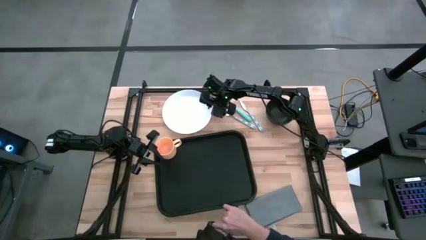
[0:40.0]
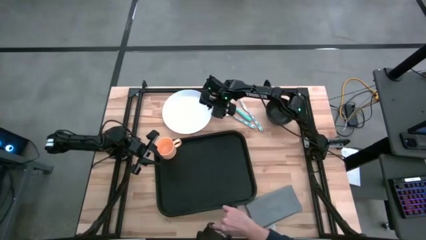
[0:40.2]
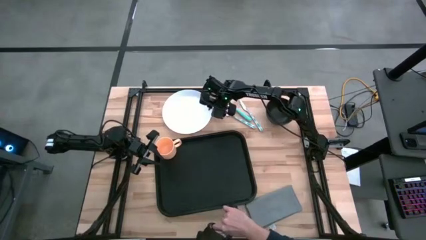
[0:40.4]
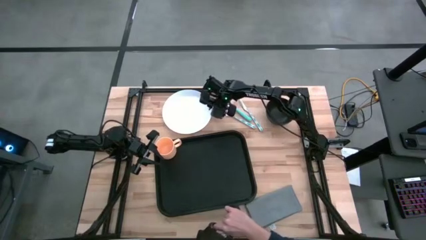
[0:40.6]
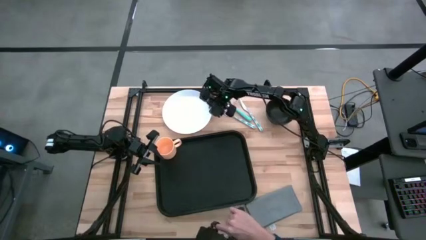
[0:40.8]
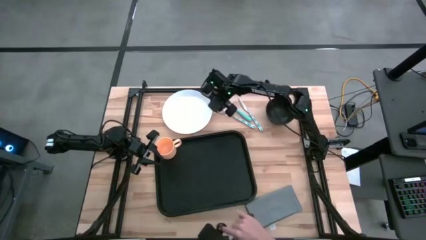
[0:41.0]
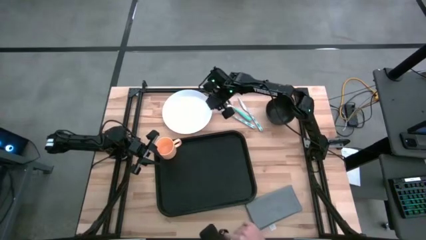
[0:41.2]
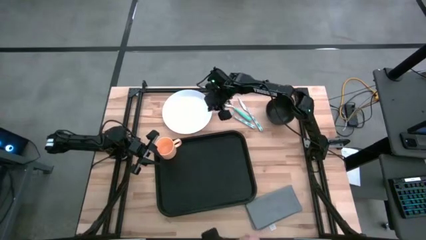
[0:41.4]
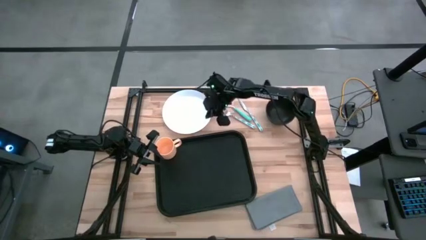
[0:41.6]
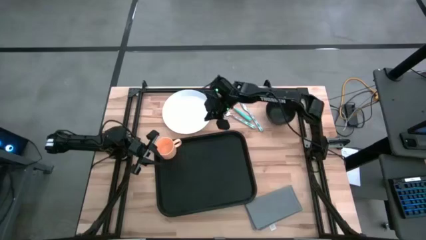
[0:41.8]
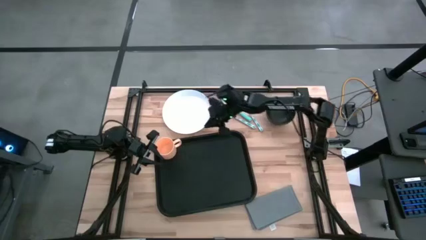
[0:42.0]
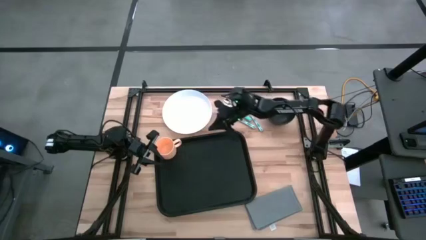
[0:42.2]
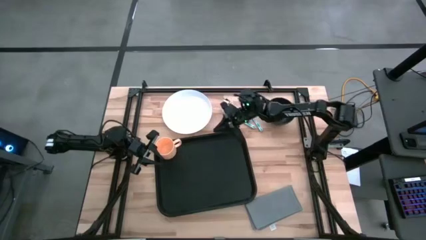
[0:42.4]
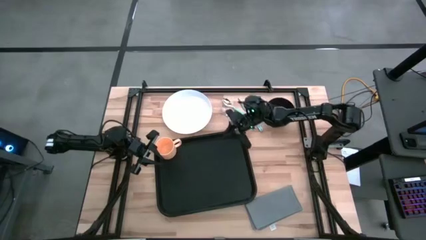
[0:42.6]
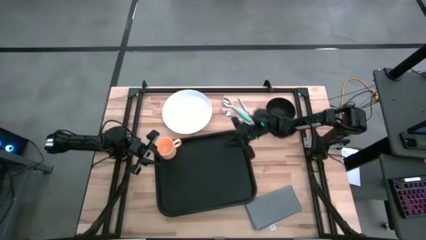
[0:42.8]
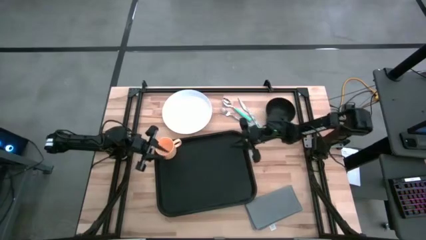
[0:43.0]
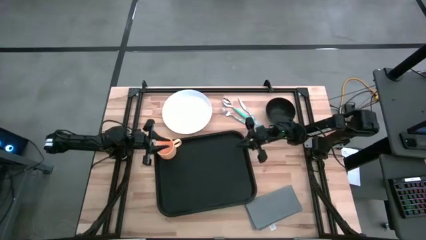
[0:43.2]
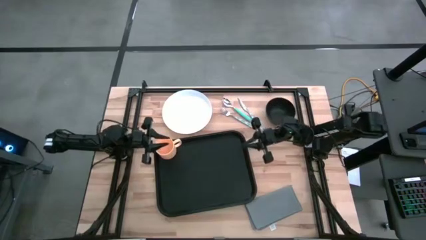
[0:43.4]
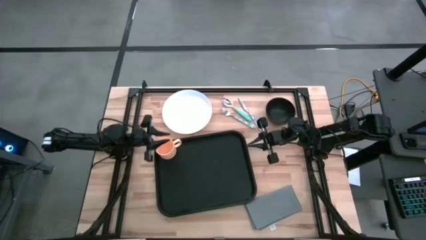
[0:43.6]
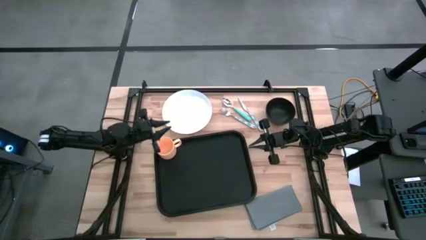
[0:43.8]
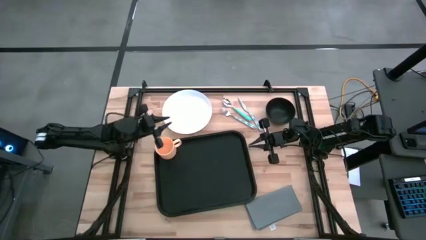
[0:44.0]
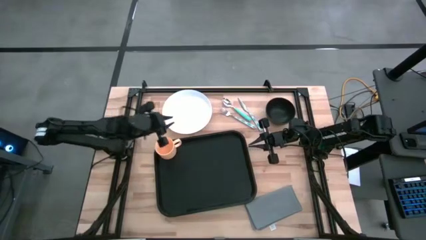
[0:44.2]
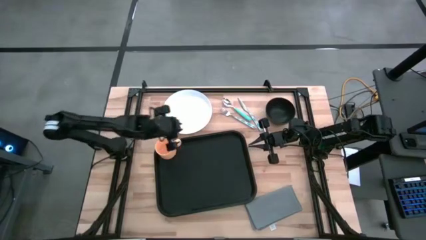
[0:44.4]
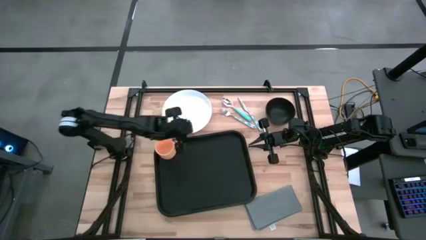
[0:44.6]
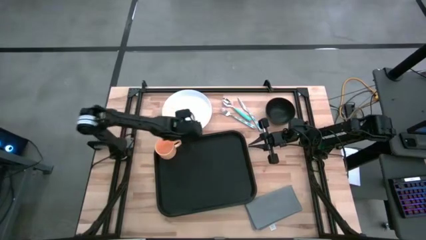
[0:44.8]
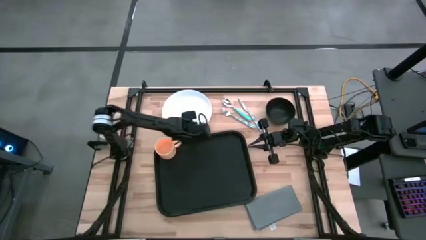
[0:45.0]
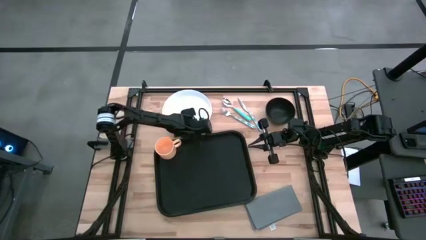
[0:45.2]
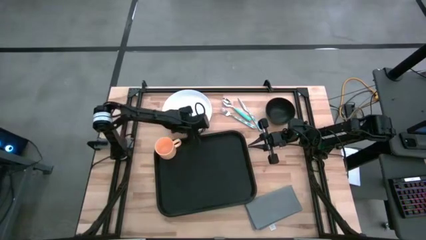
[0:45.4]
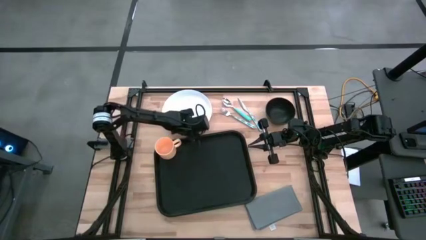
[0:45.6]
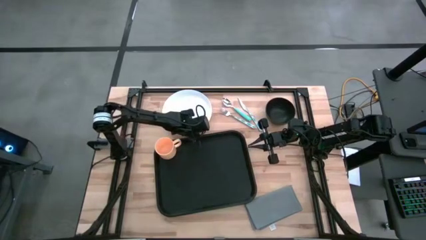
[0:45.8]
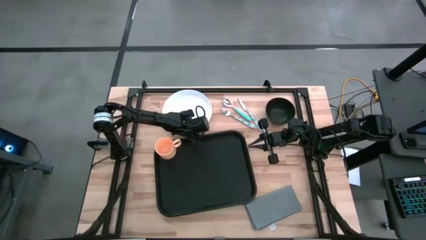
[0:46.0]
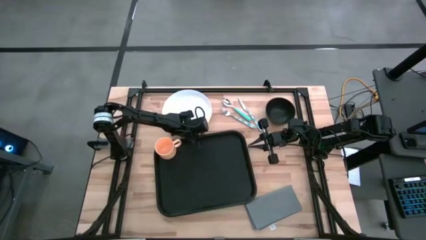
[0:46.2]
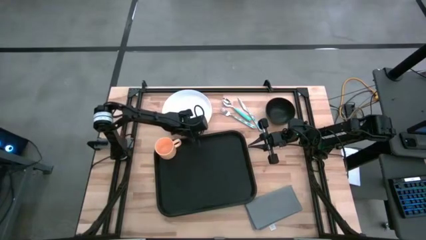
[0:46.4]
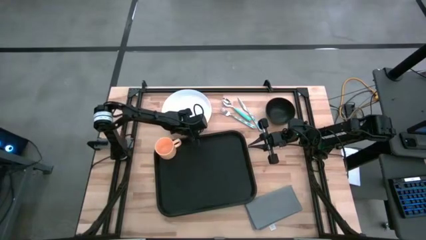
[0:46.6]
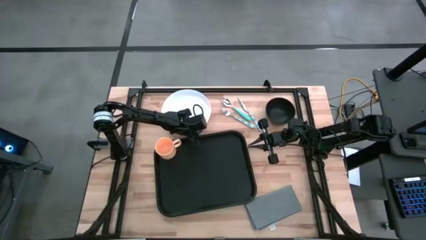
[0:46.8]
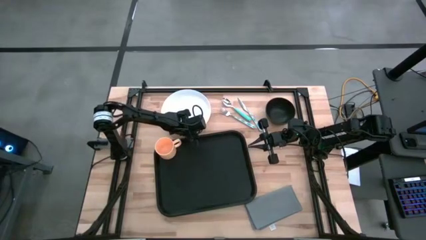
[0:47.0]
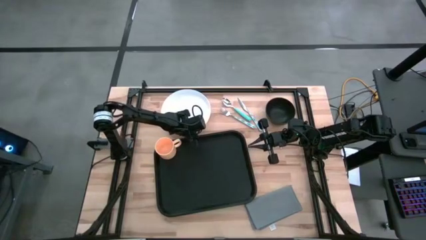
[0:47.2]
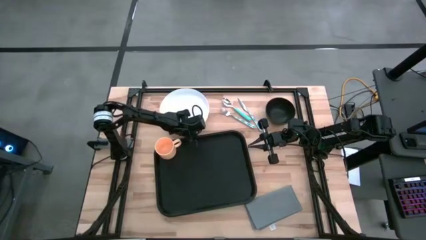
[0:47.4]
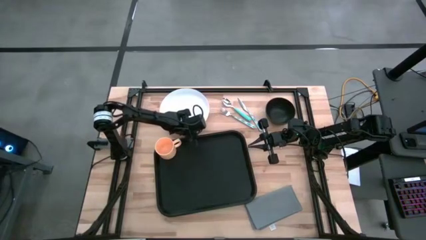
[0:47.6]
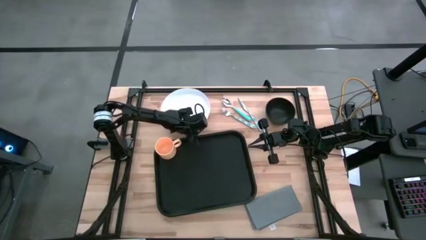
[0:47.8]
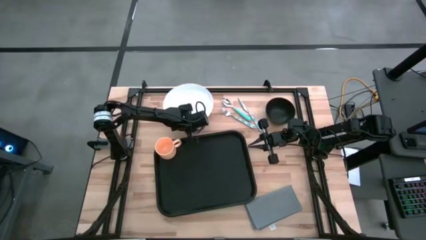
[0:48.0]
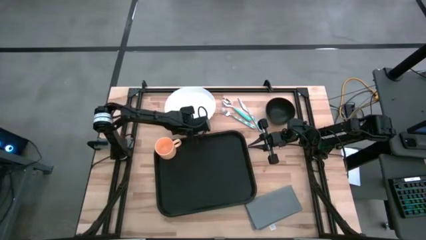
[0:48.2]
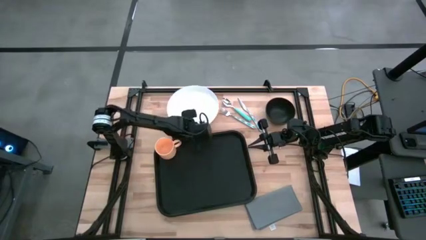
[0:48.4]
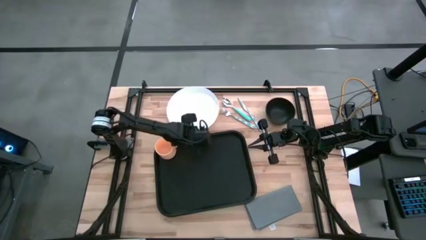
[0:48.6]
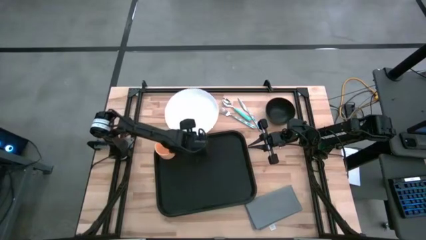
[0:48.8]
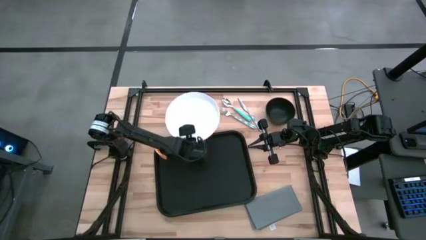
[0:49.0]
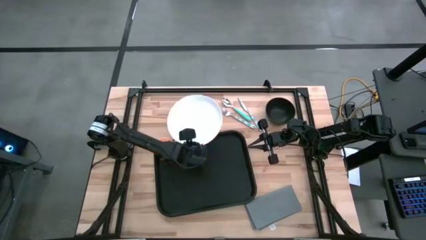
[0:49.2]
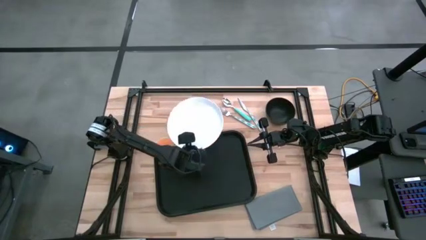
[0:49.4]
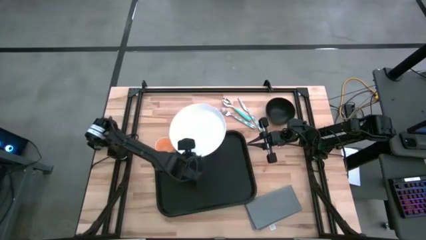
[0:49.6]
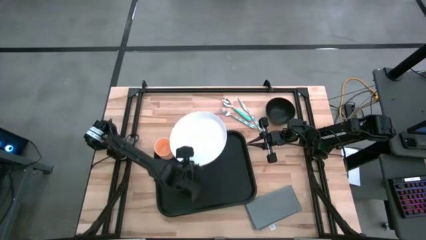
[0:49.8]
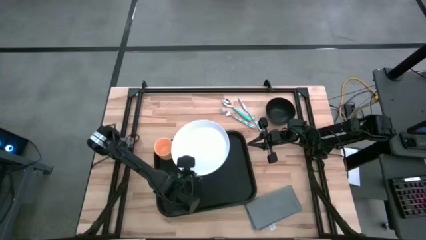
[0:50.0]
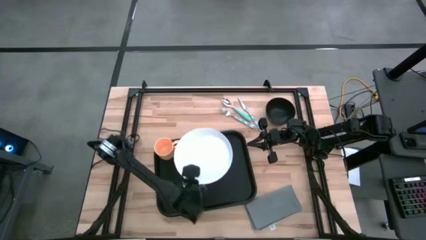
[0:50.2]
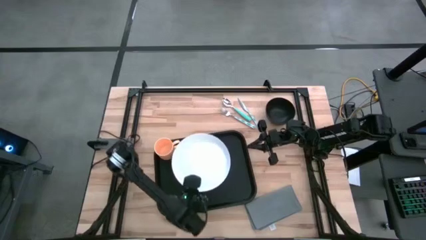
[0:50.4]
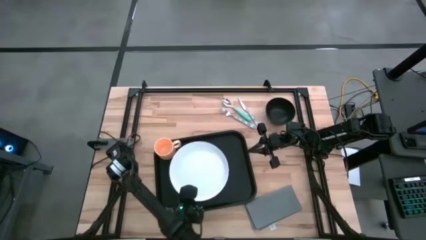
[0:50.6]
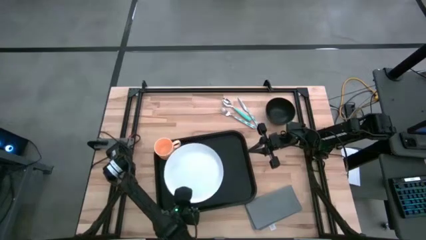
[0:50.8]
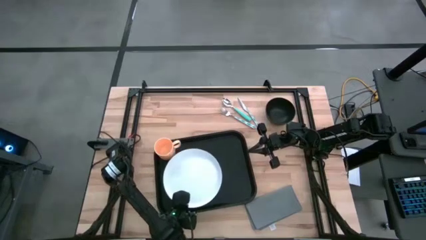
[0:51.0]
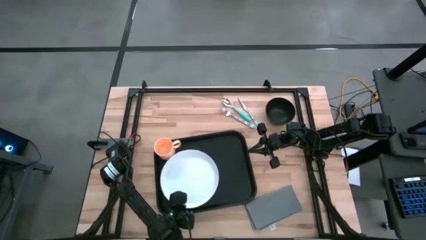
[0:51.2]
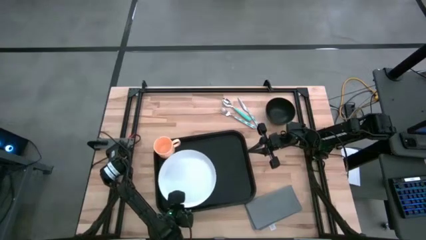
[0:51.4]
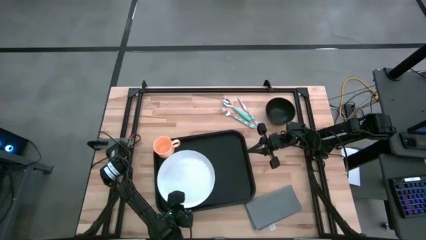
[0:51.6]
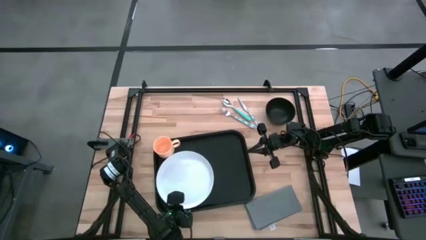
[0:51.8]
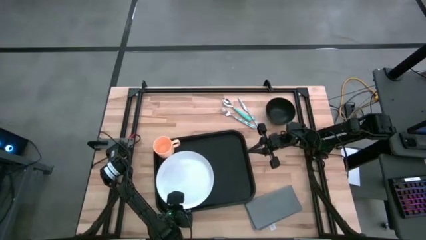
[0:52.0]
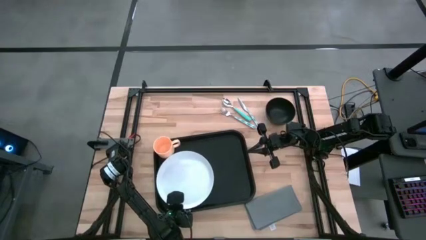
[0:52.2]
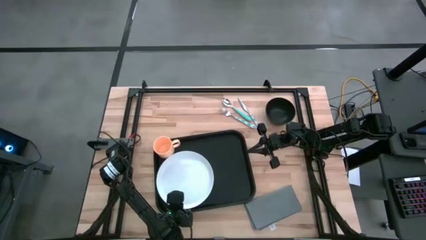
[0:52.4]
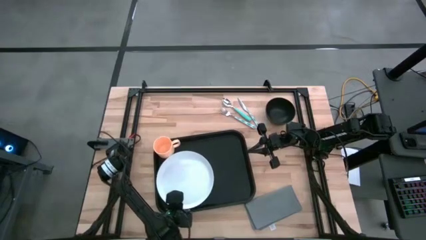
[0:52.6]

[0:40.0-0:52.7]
Task: Set up tray
Put the white plate on the black tray to the bottom right of the orange mug
